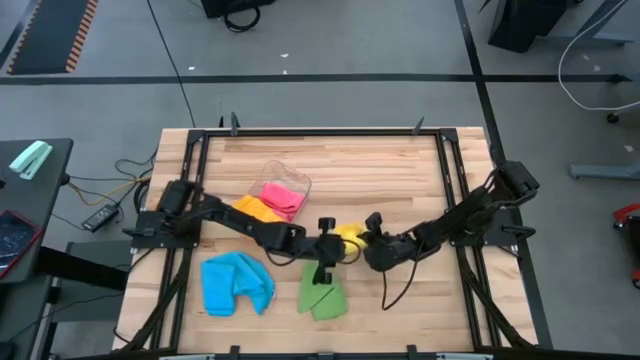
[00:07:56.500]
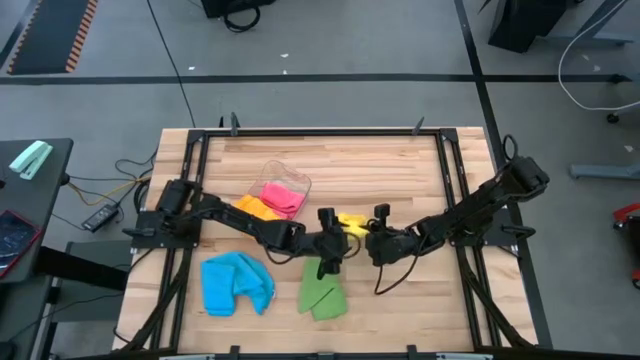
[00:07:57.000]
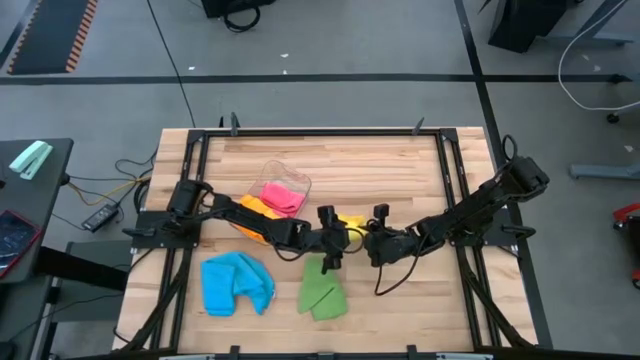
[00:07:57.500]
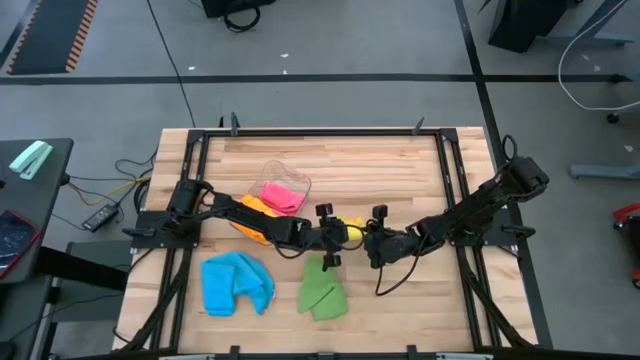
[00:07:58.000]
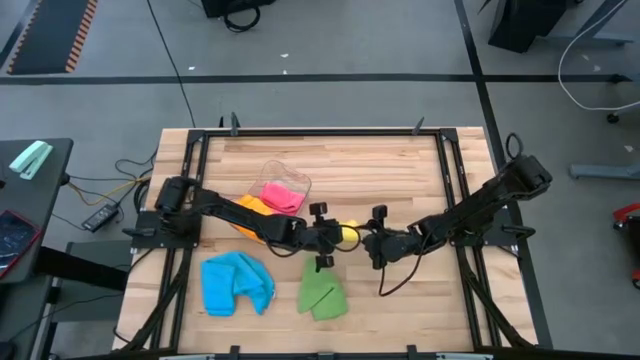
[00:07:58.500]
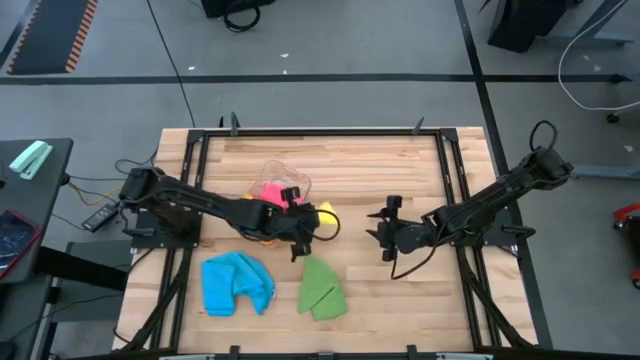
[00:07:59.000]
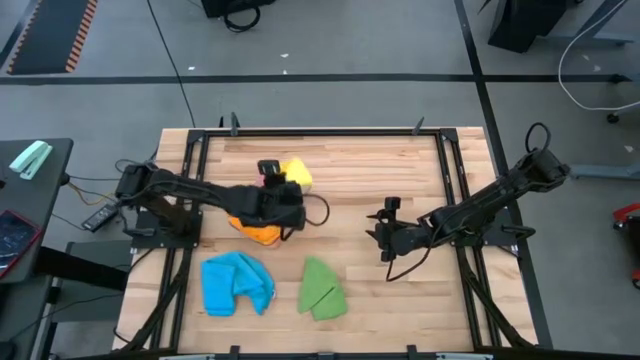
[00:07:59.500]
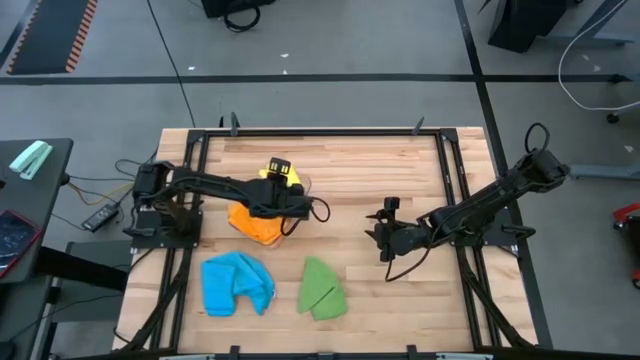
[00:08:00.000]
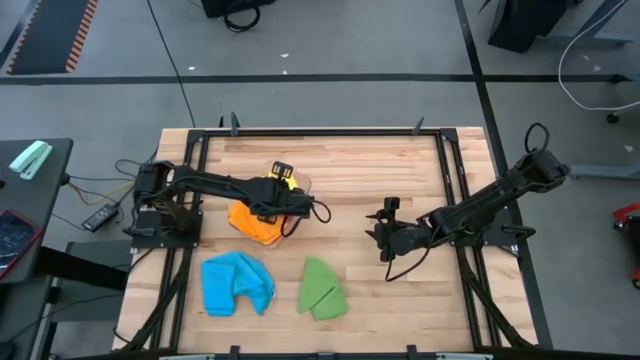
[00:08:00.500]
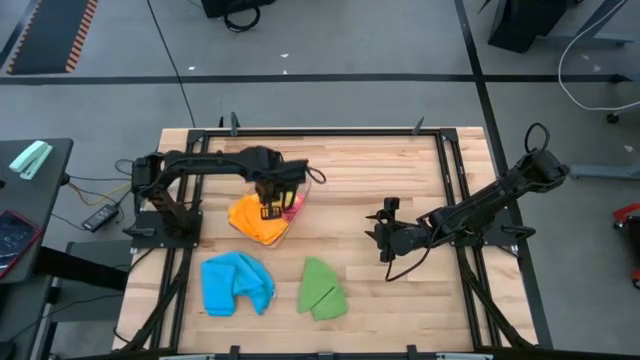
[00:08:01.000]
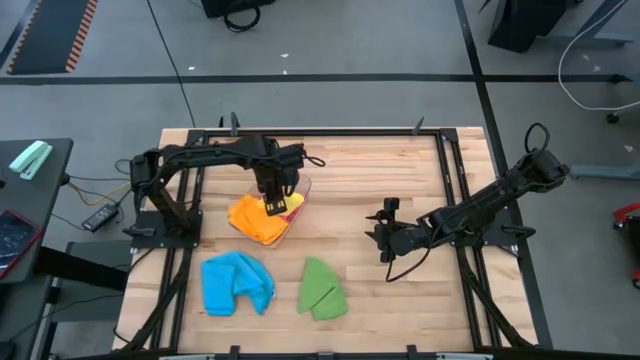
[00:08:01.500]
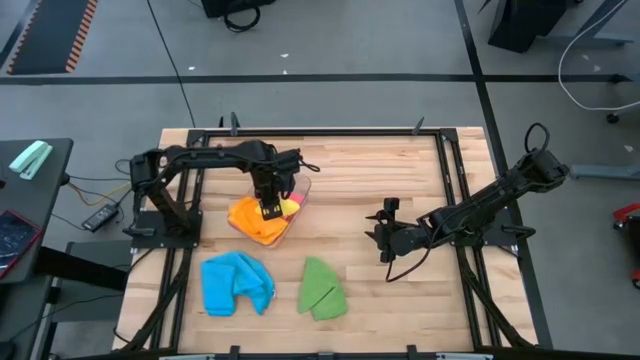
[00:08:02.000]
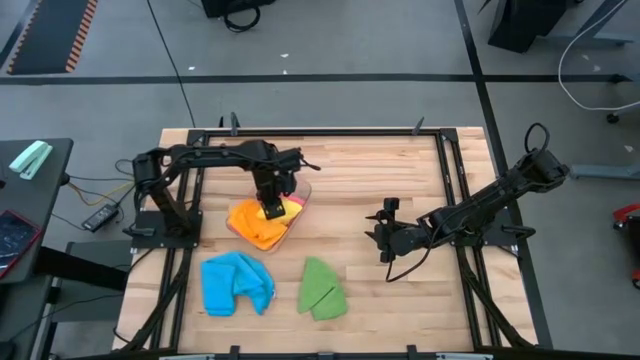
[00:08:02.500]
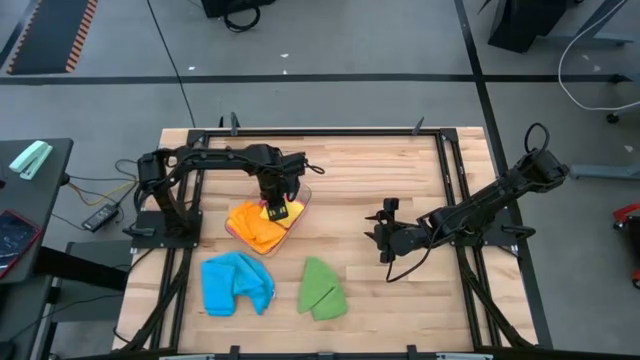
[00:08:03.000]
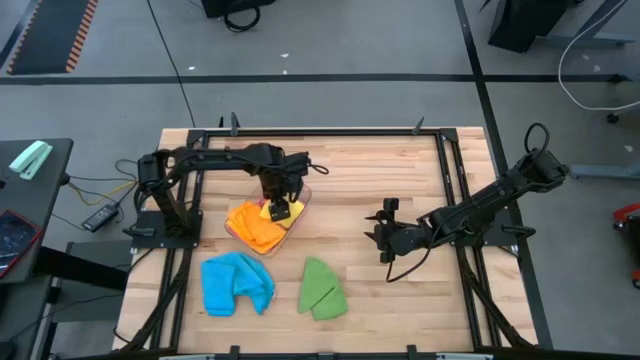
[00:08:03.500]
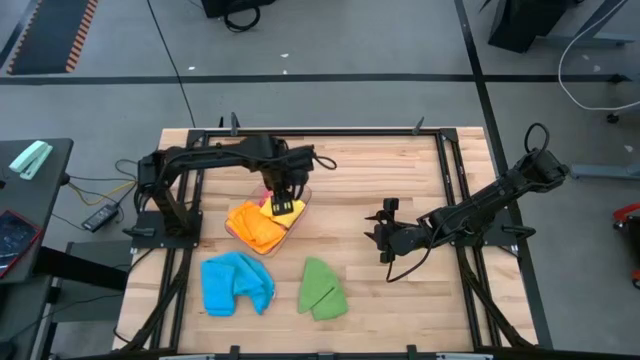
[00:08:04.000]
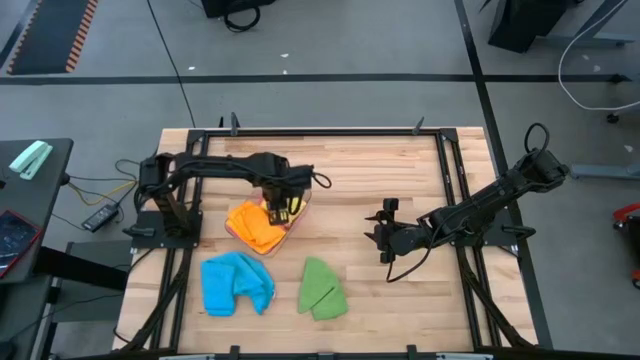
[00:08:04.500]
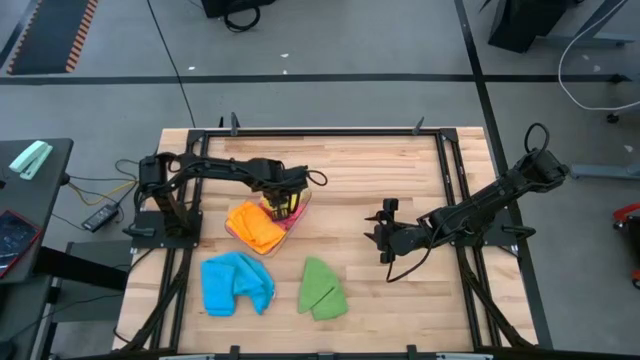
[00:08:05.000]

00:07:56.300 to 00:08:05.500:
Task: Fold microfiber towels
Put the folded yellow microfiber towel into the transparent bin
